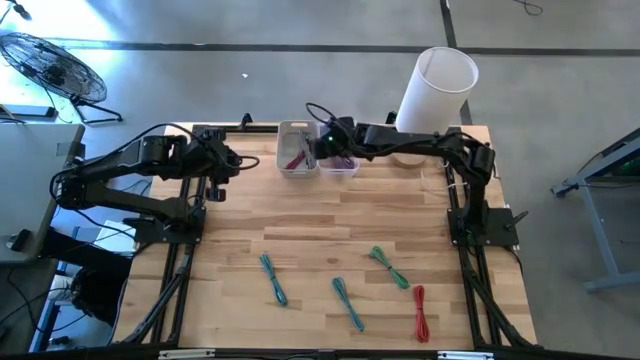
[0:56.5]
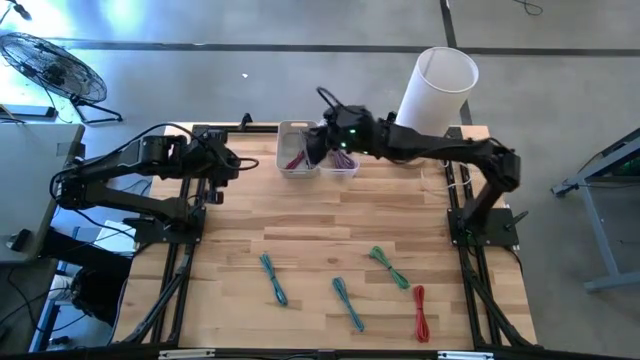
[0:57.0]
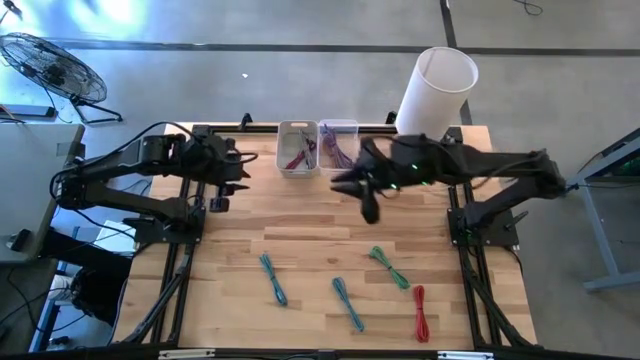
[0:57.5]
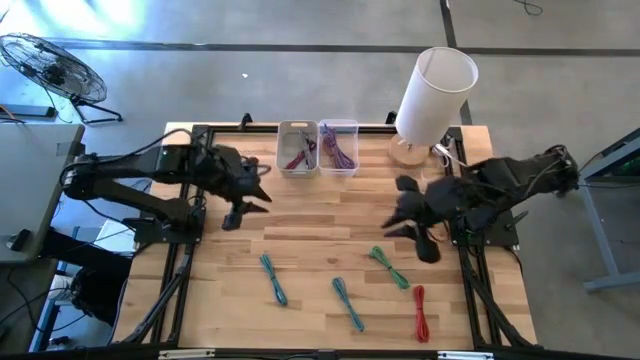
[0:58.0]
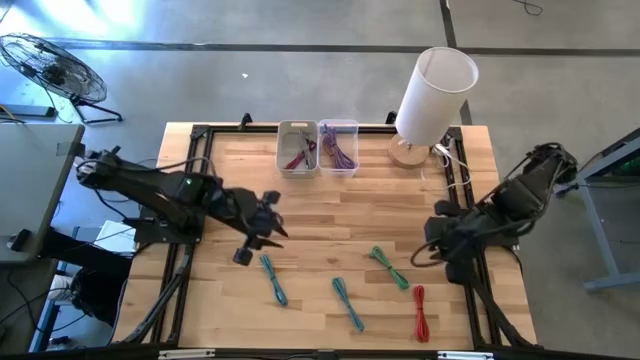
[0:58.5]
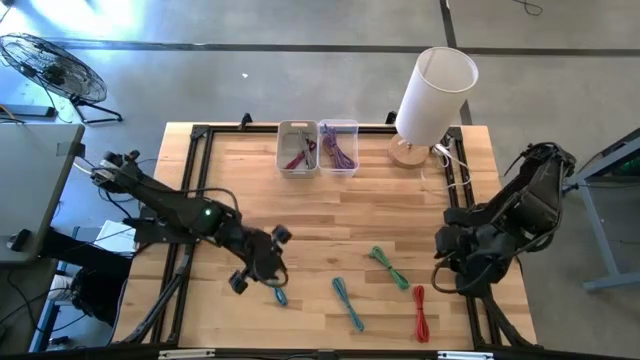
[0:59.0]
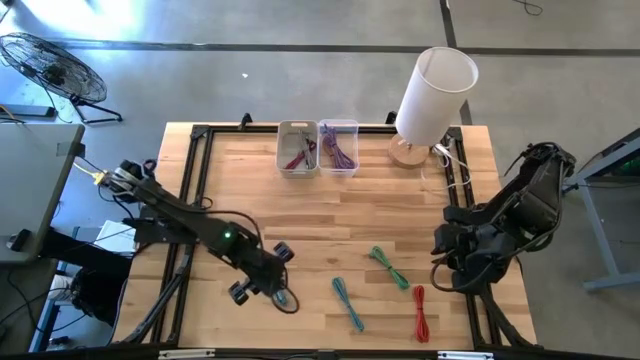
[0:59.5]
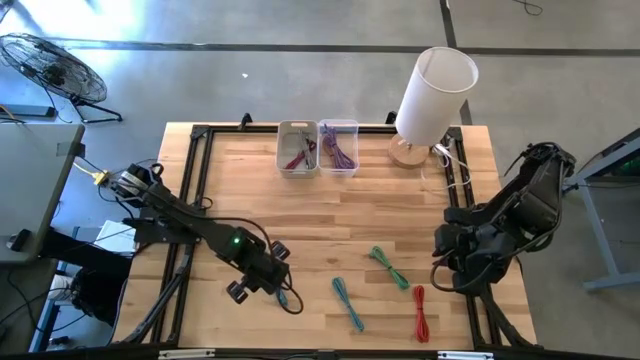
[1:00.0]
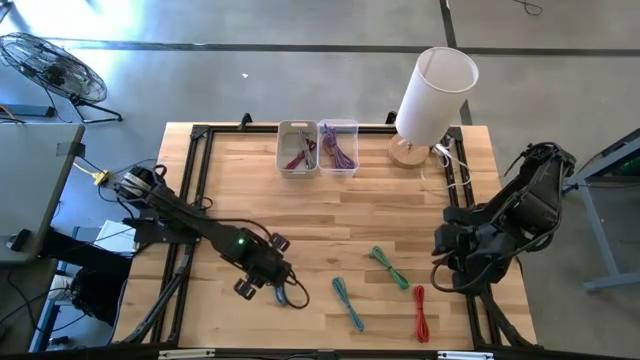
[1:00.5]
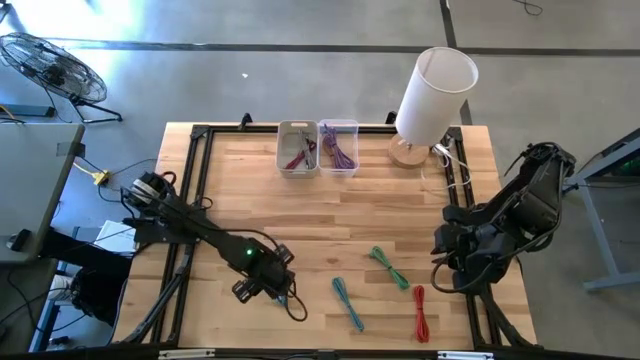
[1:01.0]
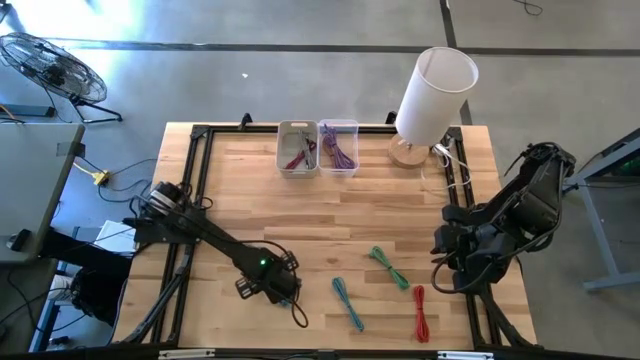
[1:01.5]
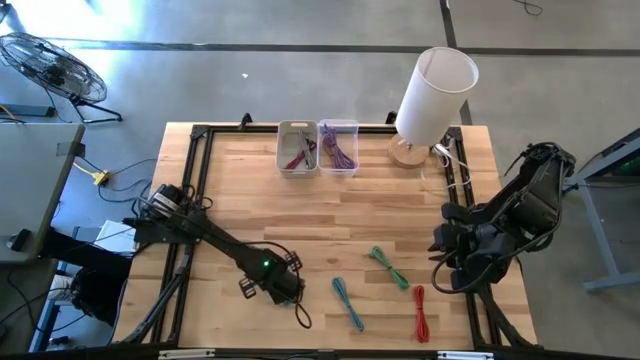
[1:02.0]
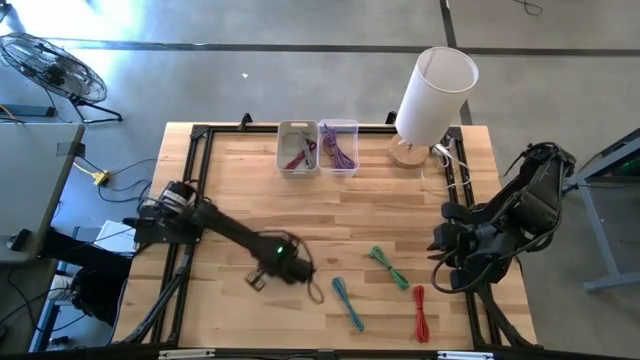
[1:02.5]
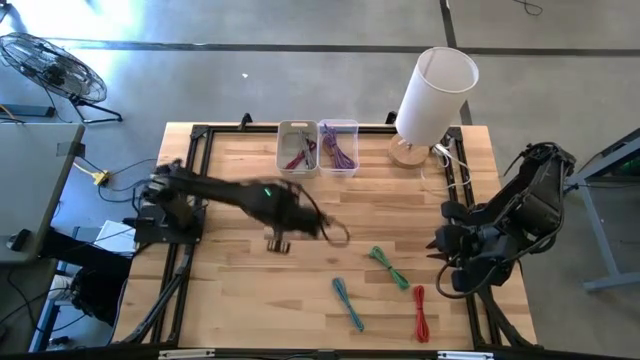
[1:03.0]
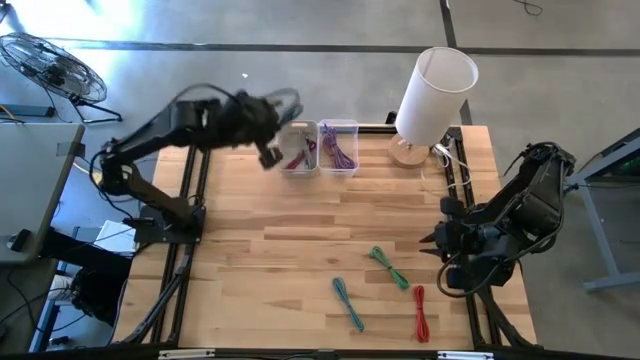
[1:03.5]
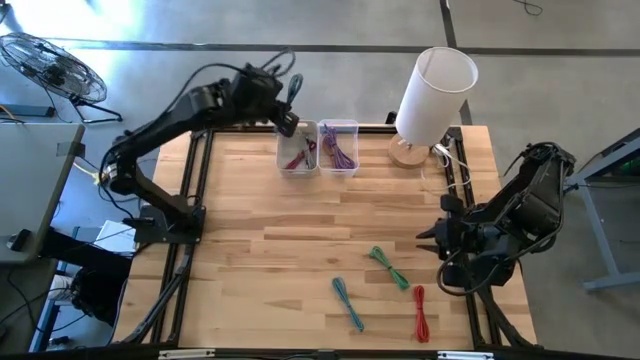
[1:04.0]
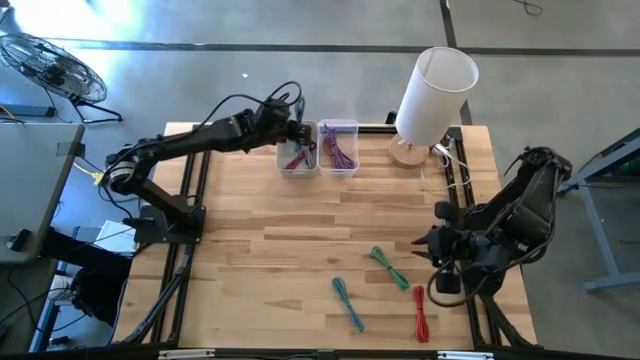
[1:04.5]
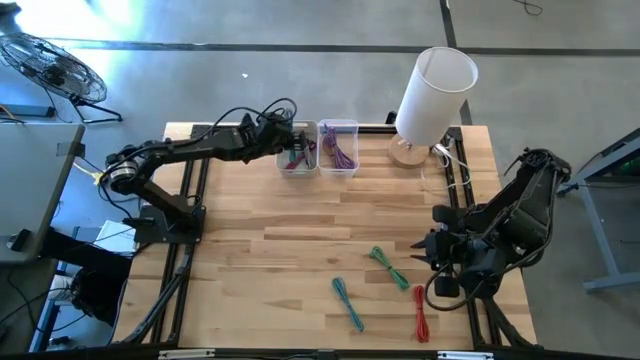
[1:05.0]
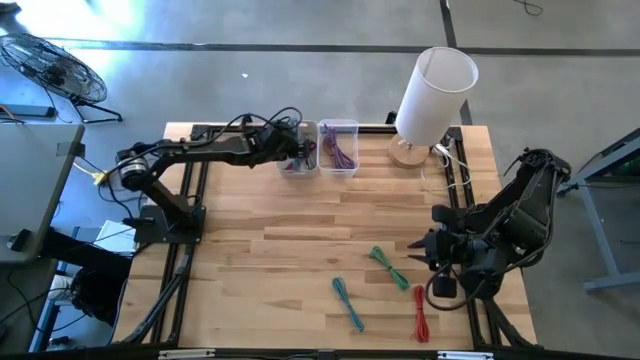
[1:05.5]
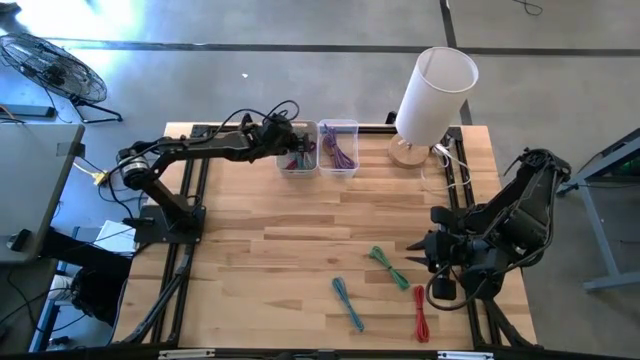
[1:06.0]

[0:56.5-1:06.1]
Task: Pick & Place USB Port
Put the left blue and black USB cable into the gray bin

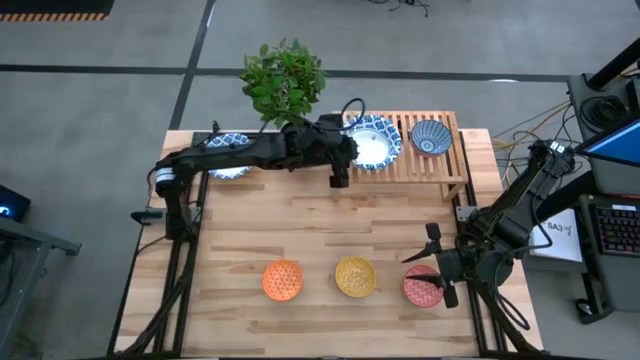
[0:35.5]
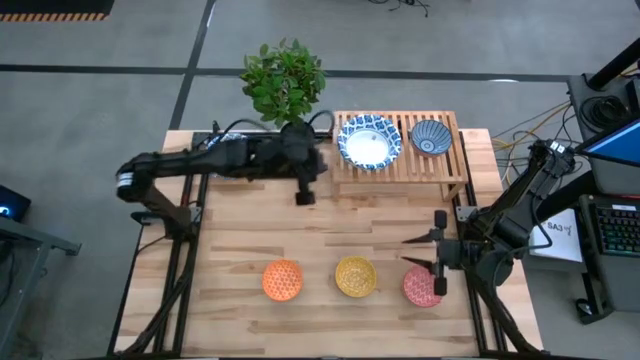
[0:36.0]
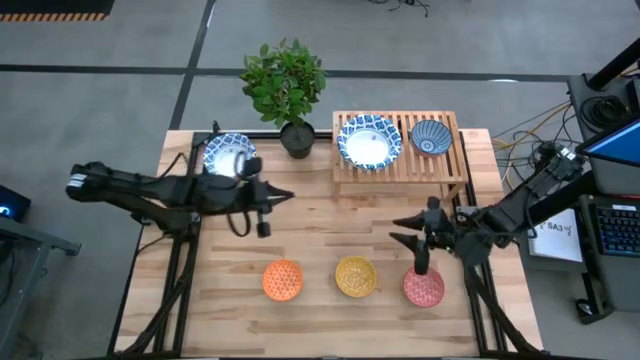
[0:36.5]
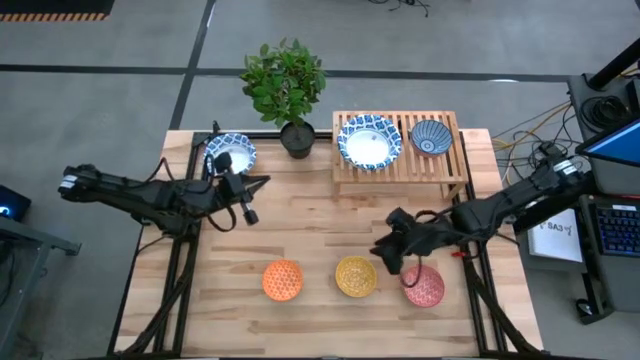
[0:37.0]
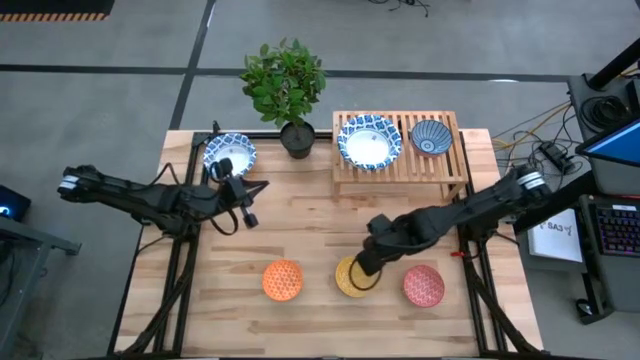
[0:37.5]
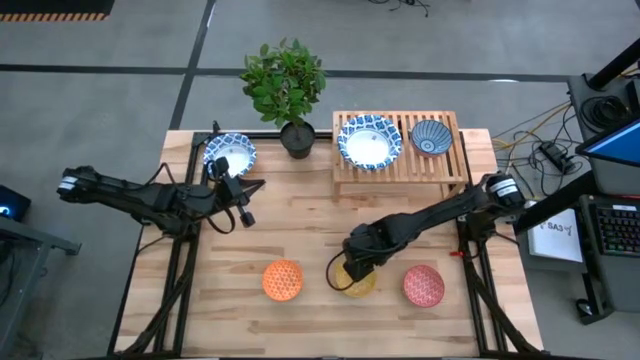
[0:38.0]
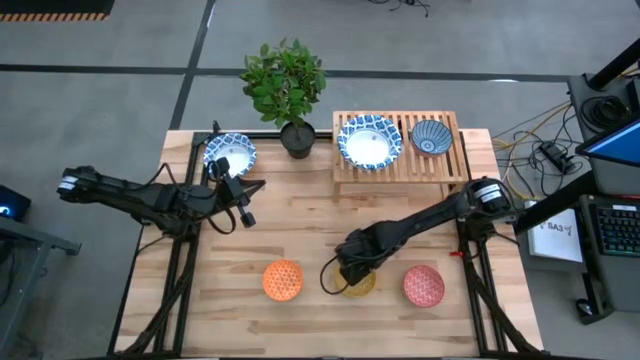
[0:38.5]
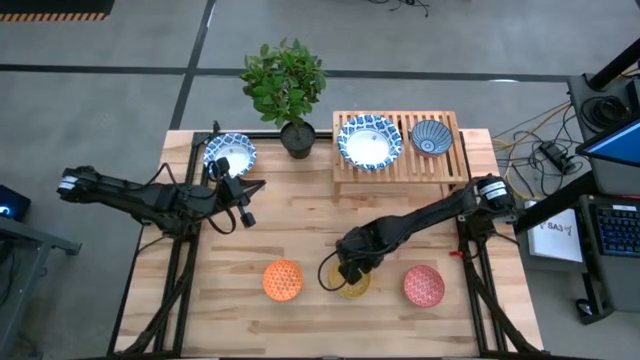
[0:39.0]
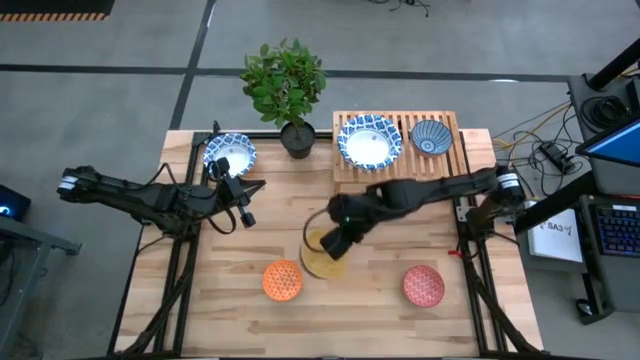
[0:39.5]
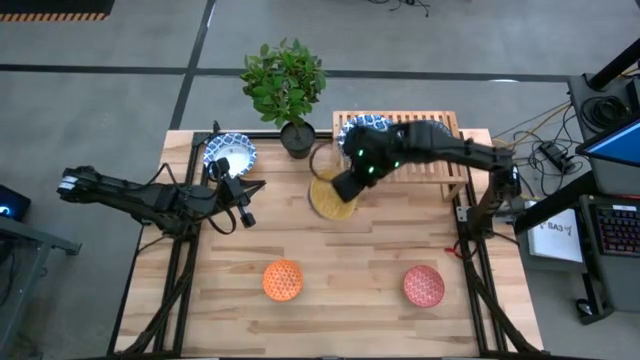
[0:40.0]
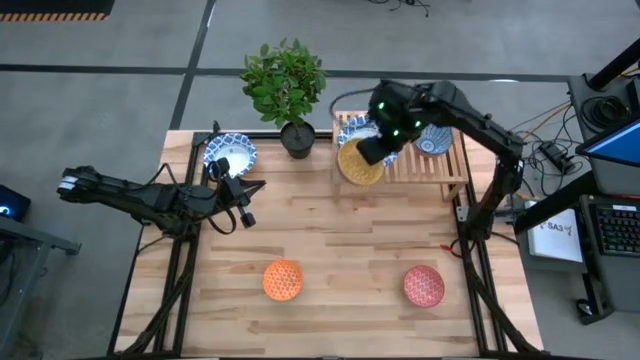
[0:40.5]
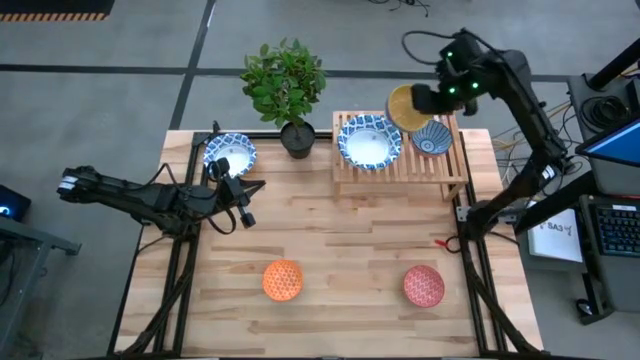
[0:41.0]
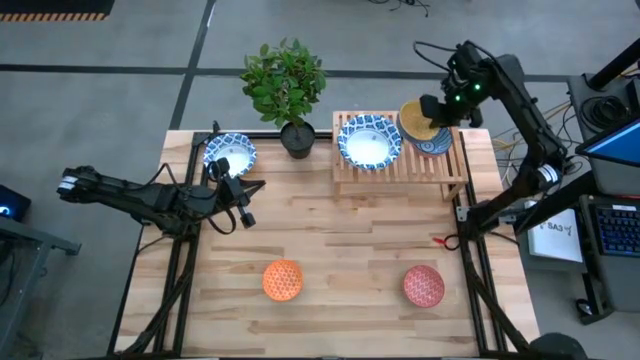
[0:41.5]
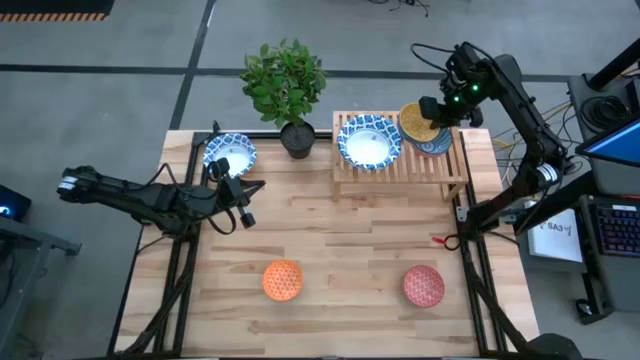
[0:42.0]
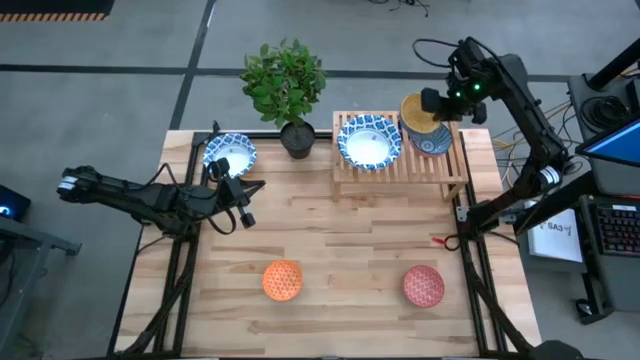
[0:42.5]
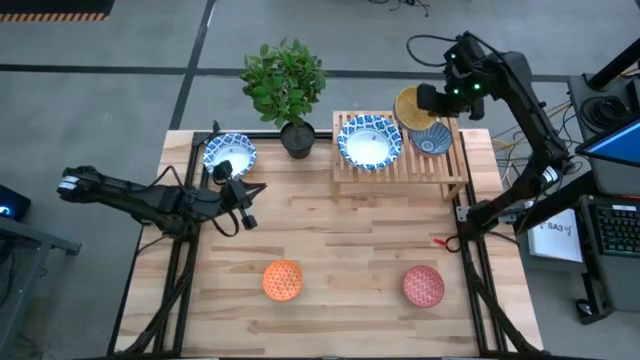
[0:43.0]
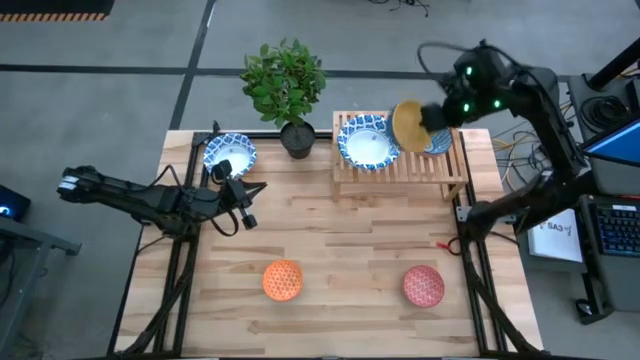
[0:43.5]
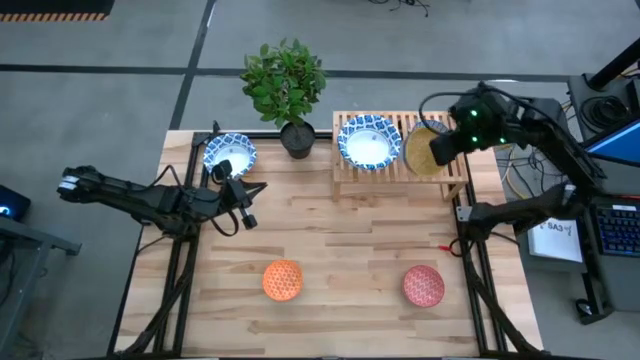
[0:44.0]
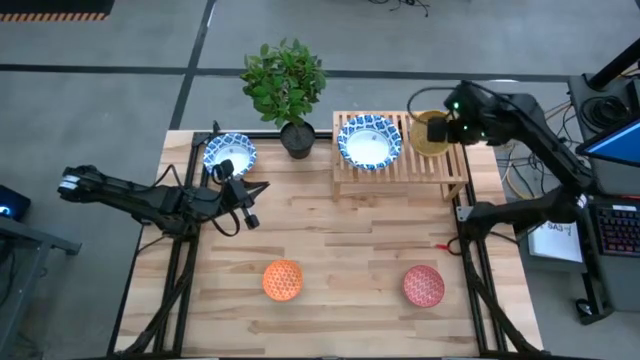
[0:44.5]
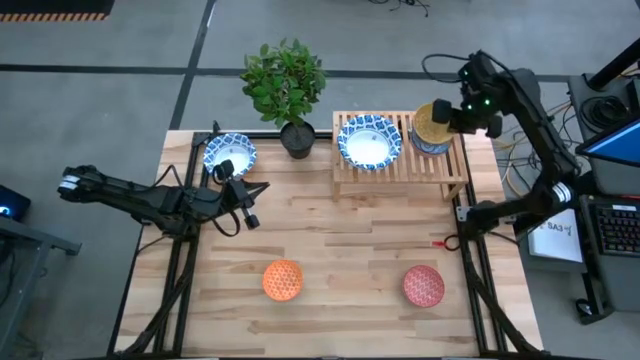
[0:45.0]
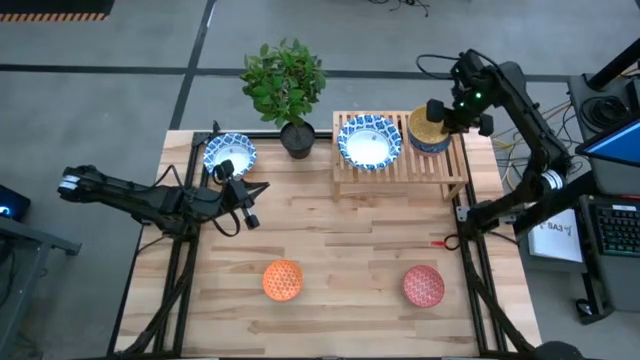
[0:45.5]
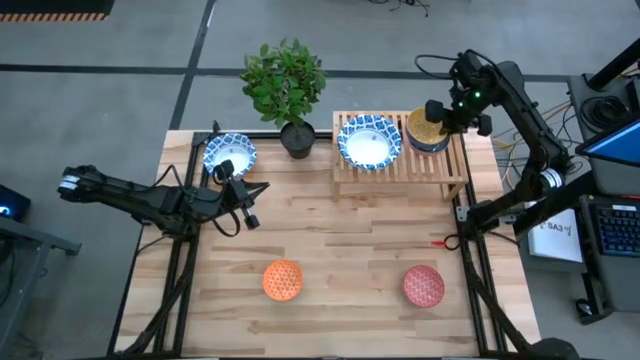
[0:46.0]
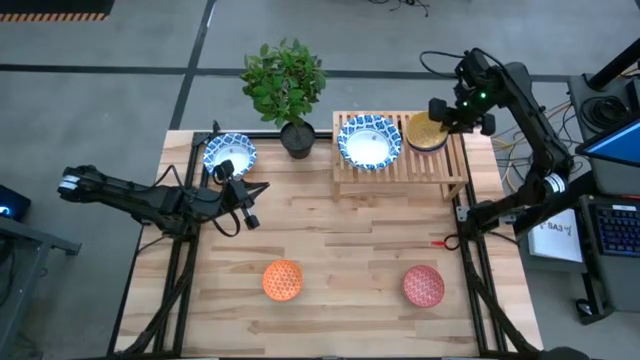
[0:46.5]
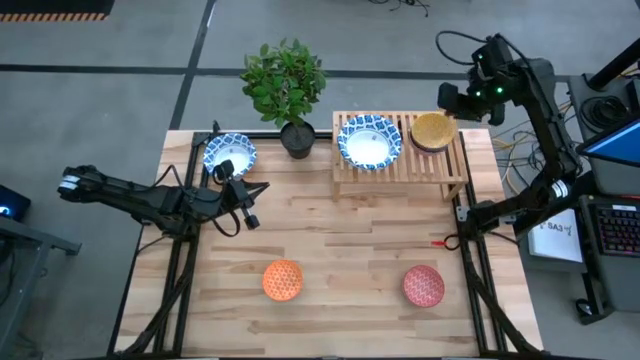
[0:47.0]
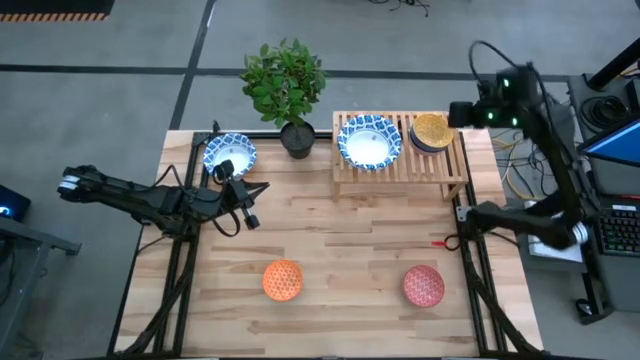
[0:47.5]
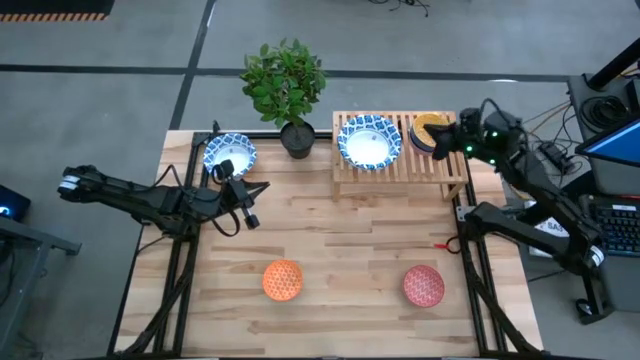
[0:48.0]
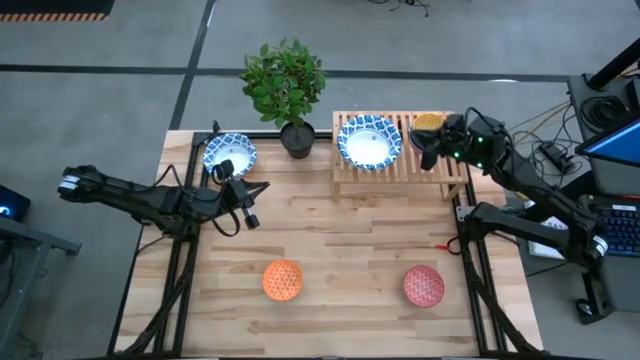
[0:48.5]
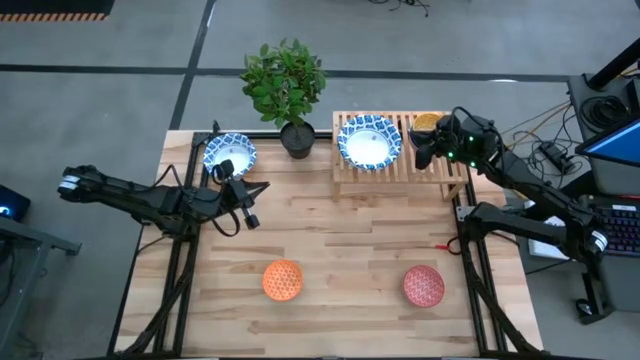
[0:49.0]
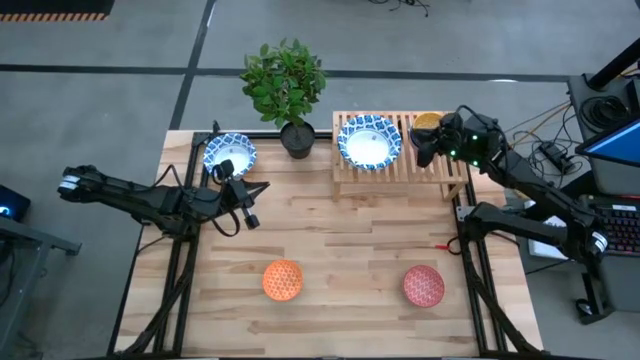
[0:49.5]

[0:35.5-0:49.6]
Task: Place and stack bowls onto a shelf
Stack the yellow bowl on top of the blue bowl on the shelf
